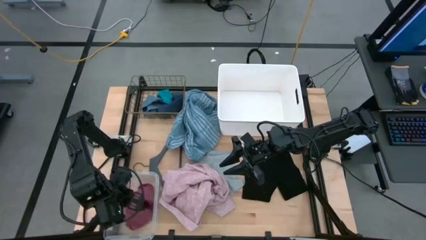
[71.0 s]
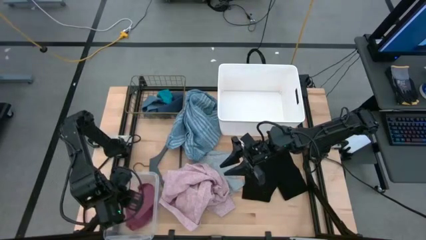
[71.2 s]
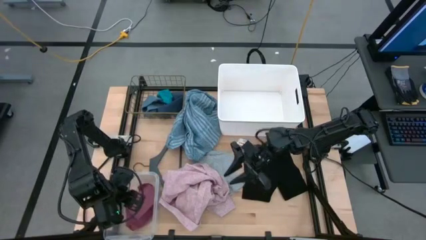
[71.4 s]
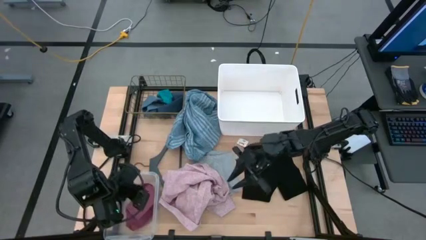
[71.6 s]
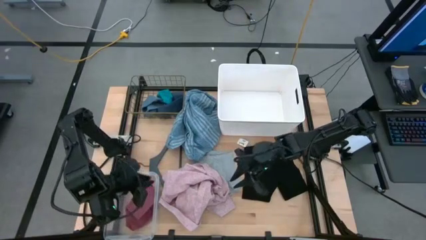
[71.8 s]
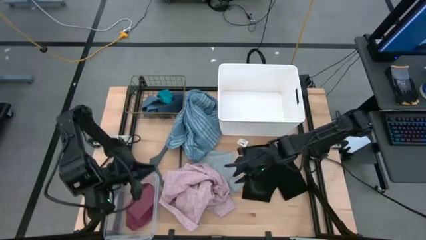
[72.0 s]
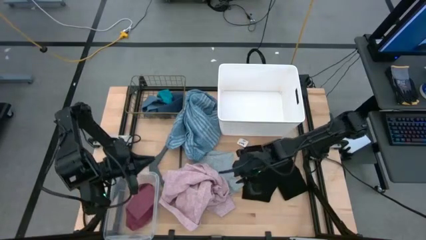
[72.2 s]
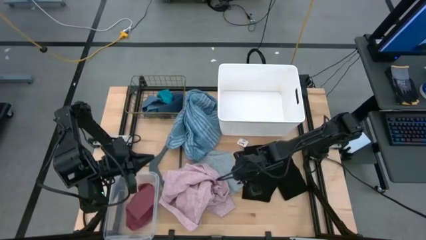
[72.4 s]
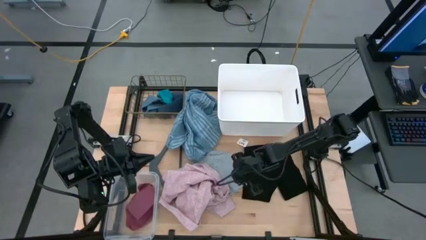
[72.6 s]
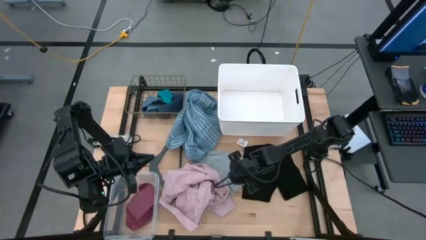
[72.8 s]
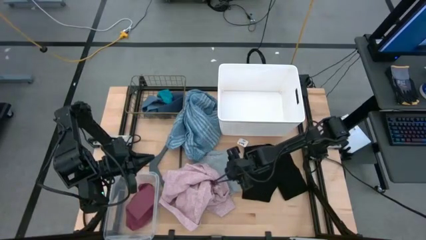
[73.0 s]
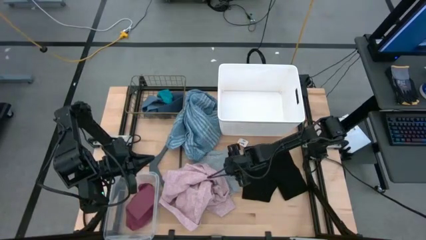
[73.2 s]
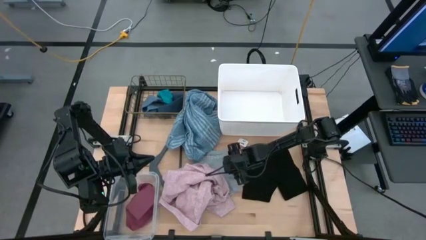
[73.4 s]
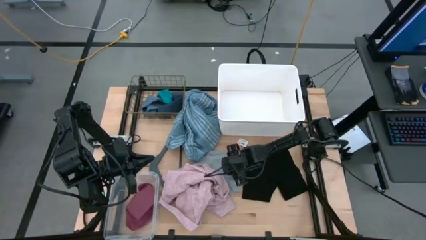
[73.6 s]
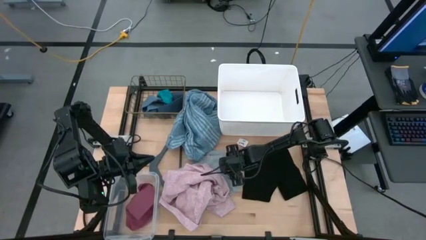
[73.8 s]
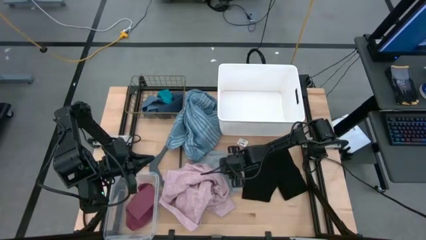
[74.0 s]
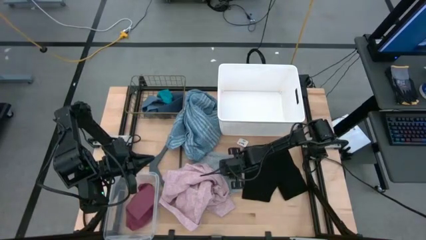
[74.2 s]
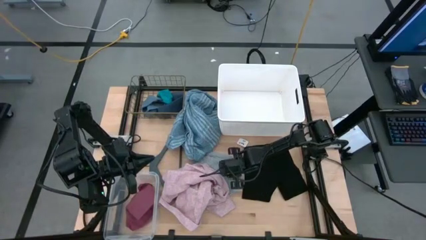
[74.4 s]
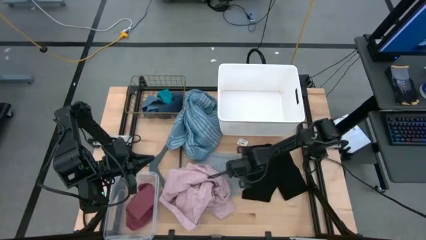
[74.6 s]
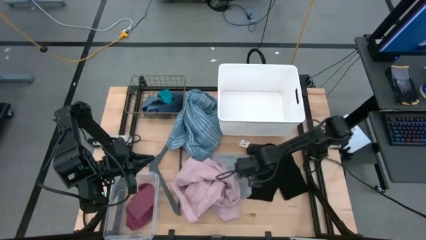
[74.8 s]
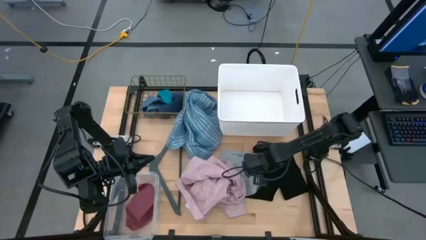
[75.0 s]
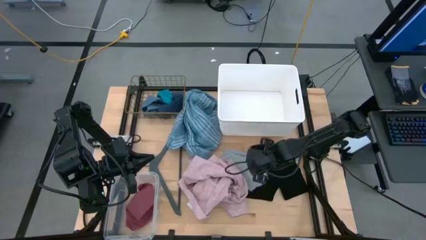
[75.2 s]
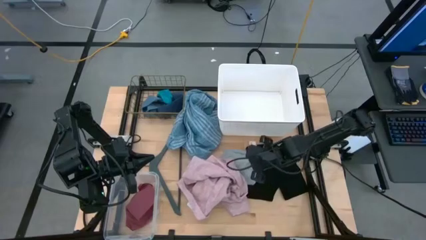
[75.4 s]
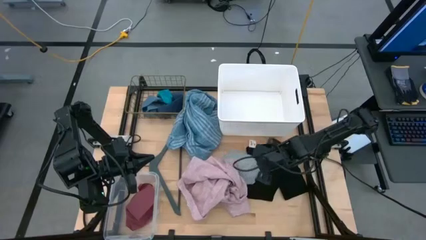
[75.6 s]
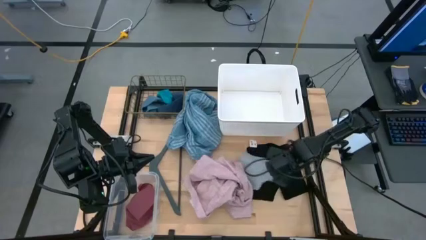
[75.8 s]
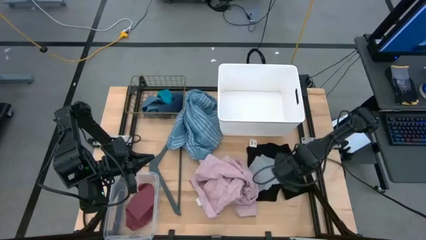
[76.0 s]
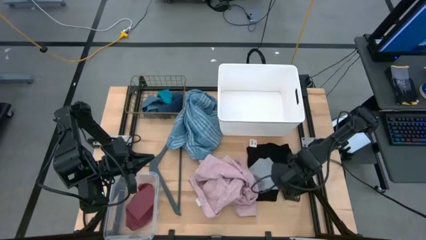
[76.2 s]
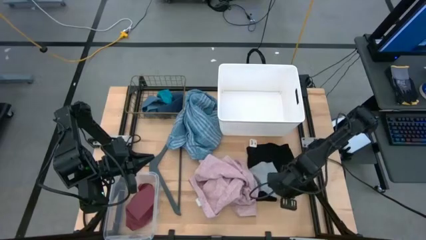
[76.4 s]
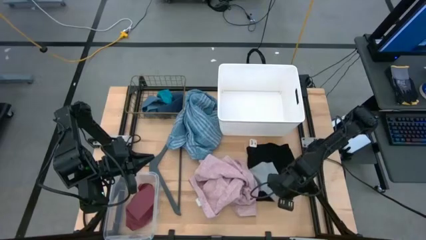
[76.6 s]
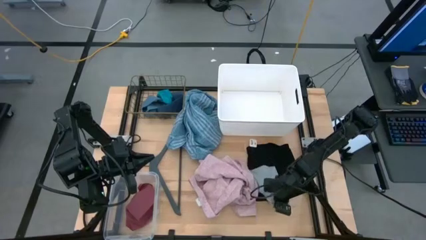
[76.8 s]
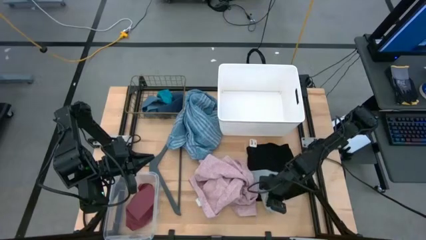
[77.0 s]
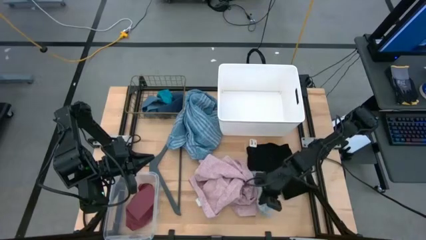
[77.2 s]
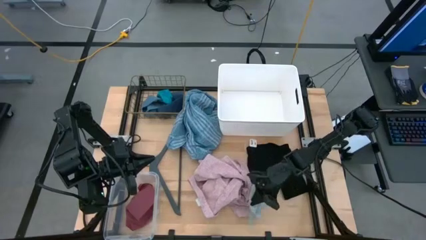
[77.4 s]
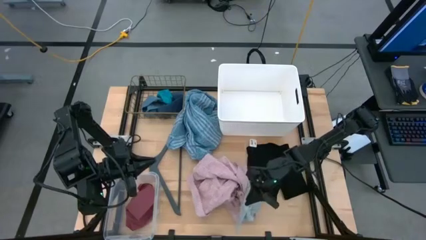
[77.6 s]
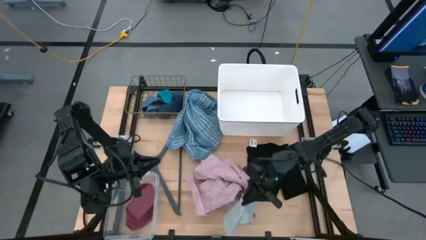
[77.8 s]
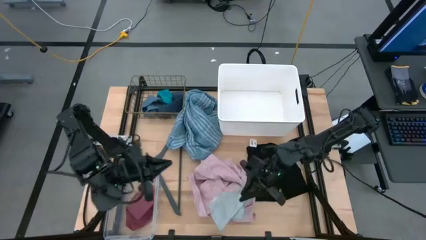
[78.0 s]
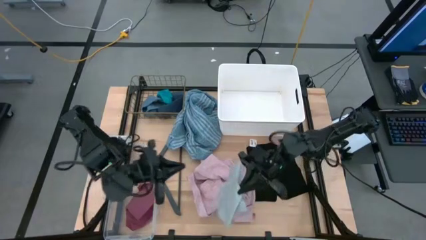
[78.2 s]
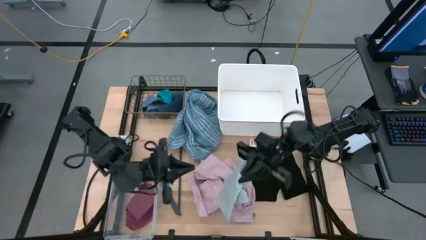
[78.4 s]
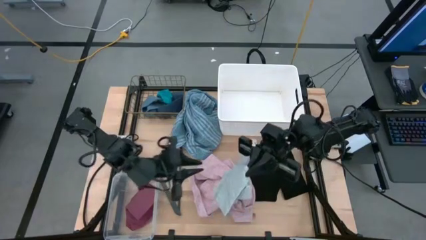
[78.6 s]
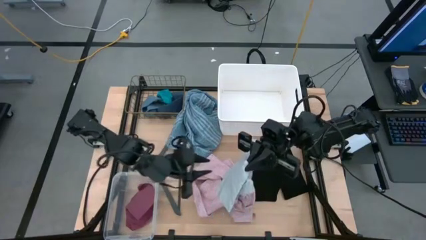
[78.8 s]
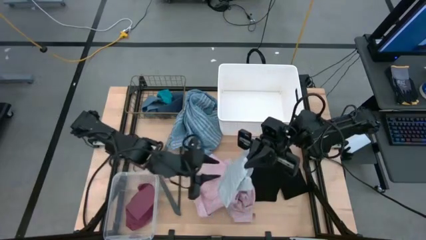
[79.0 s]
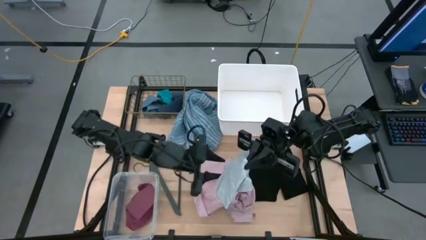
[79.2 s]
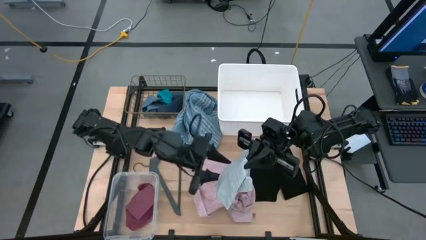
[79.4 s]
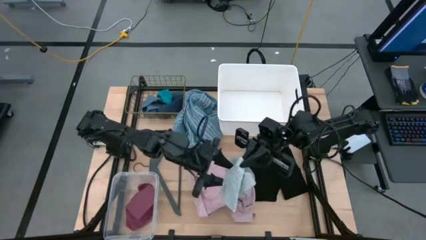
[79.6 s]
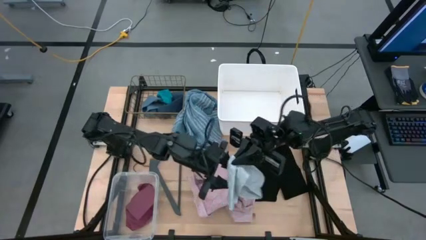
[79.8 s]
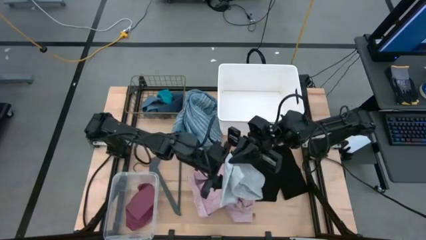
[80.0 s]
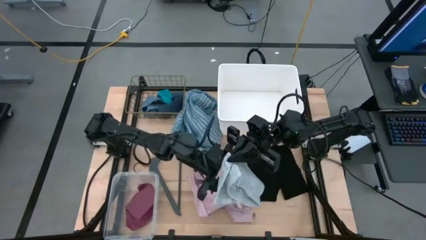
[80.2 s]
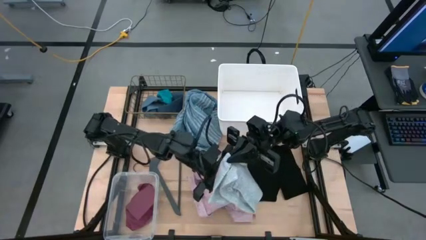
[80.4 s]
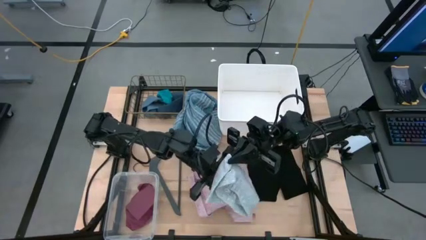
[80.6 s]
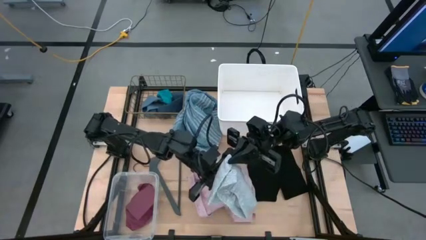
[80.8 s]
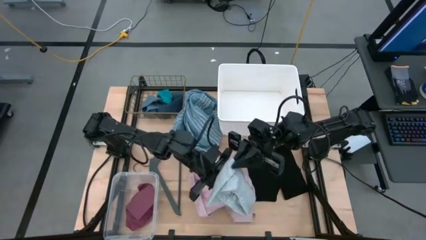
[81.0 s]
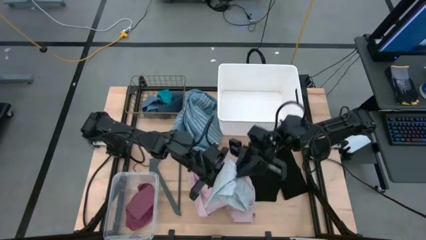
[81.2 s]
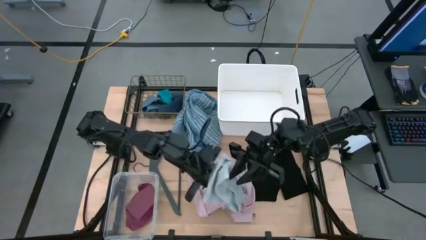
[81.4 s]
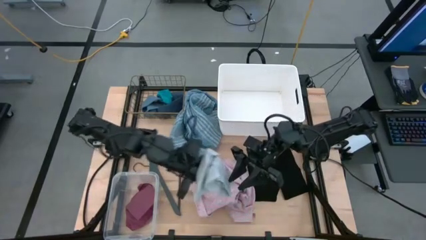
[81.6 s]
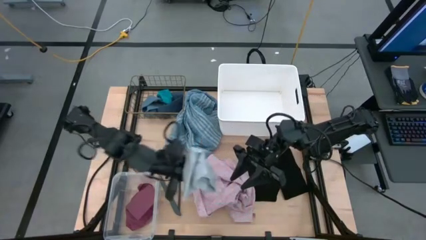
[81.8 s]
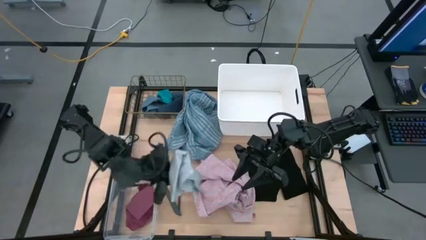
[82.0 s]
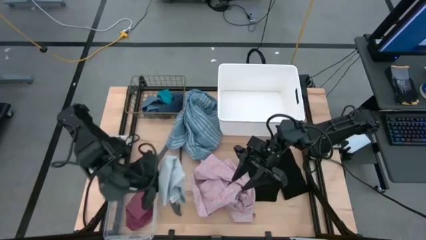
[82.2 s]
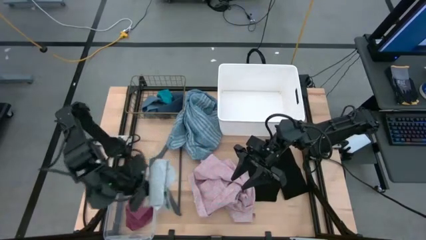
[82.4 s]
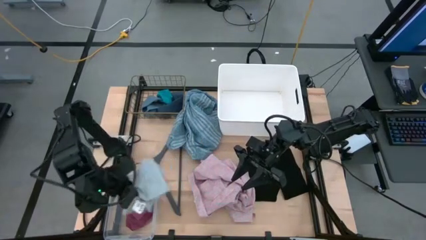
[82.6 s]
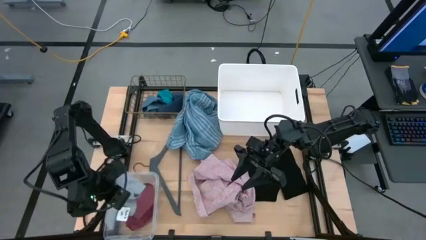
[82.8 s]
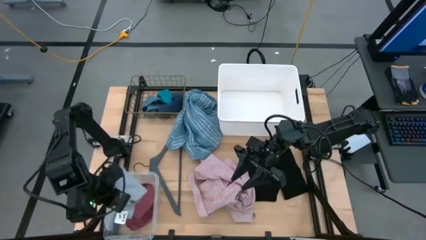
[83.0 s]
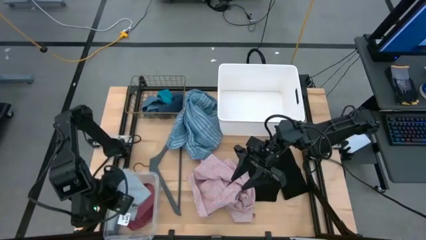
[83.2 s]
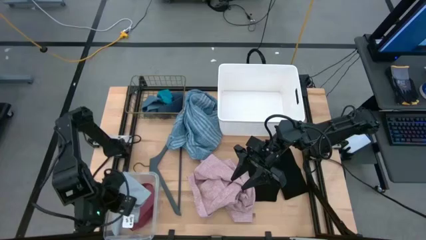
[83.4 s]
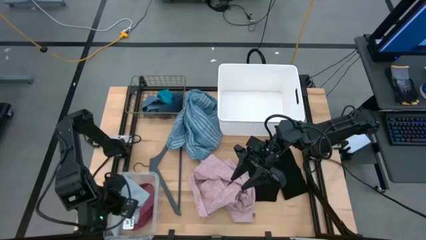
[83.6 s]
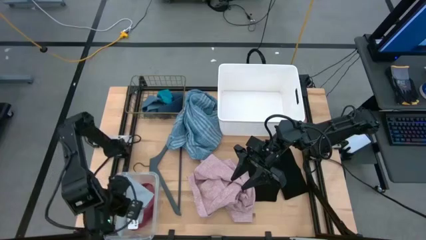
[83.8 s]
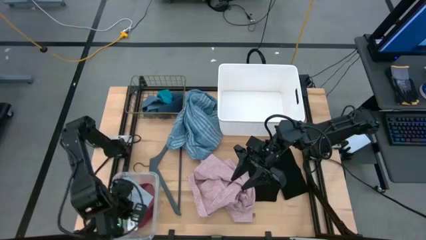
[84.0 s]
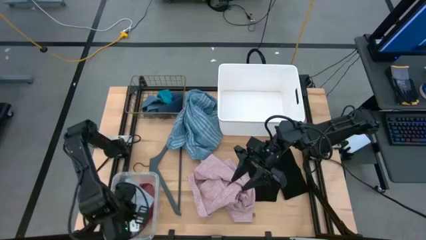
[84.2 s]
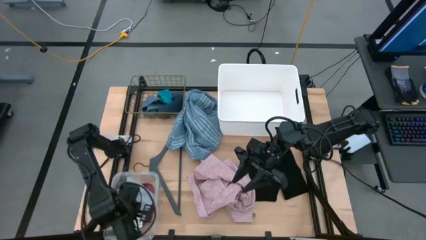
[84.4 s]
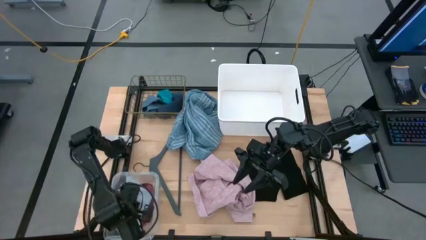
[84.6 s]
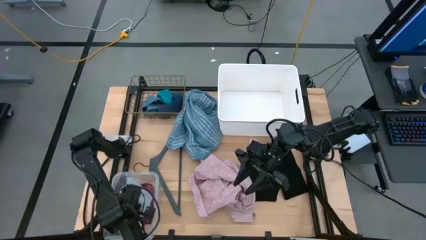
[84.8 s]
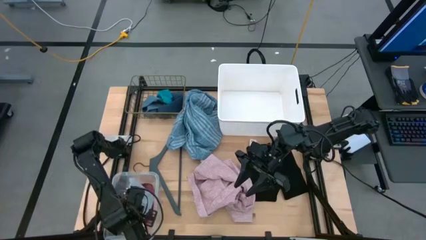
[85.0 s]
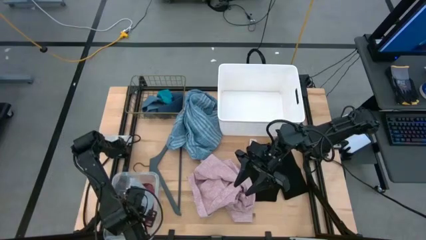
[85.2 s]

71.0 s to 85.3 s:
Task: Pick & Place Cloths
Put the gray boxers into the transparent bin

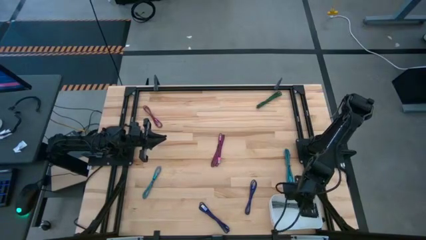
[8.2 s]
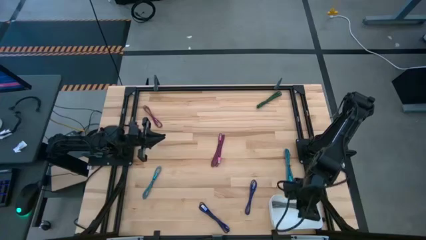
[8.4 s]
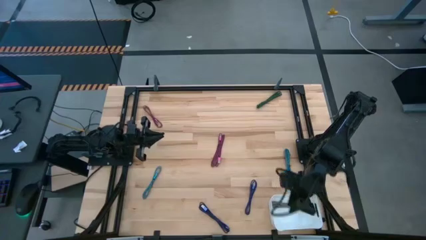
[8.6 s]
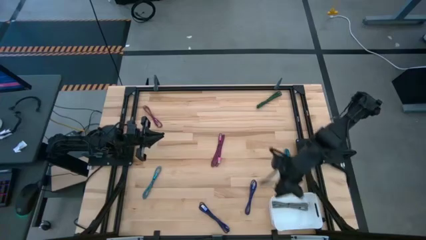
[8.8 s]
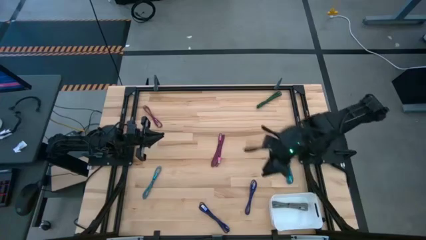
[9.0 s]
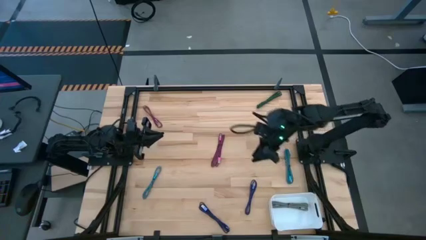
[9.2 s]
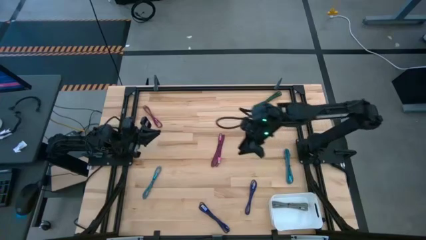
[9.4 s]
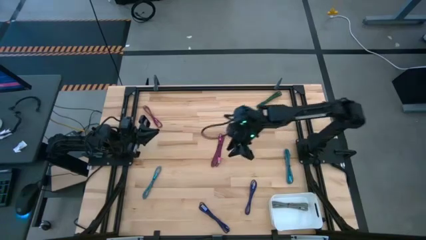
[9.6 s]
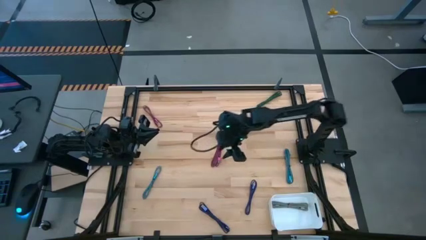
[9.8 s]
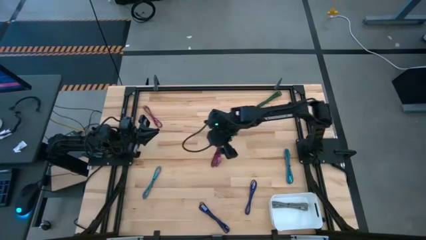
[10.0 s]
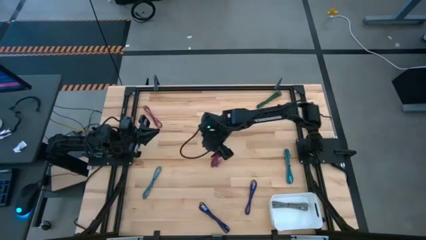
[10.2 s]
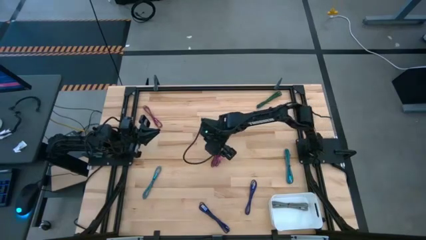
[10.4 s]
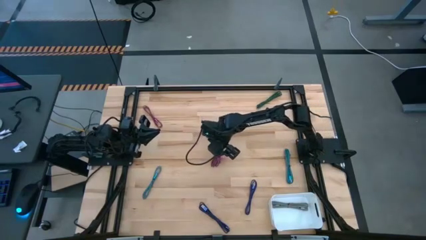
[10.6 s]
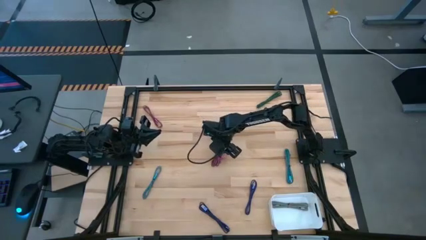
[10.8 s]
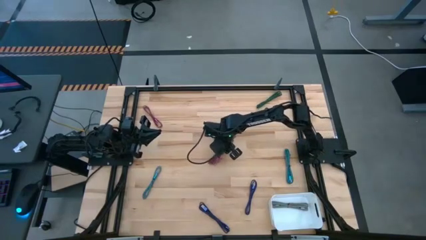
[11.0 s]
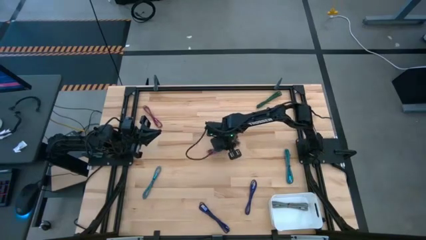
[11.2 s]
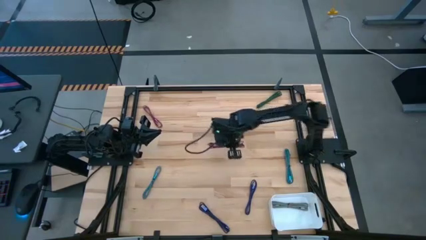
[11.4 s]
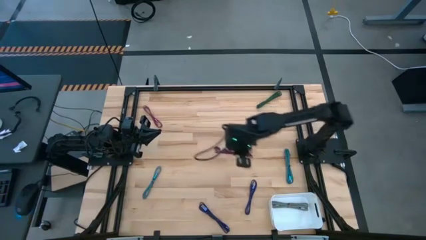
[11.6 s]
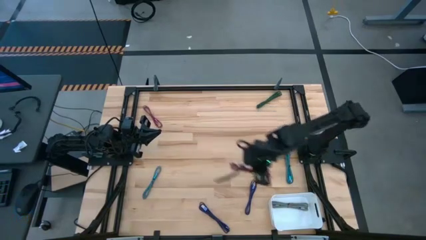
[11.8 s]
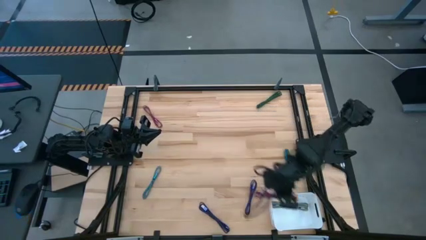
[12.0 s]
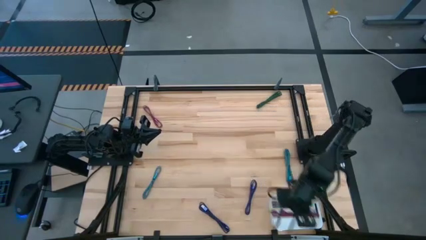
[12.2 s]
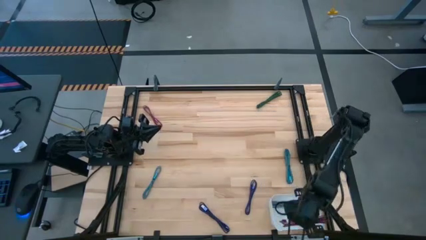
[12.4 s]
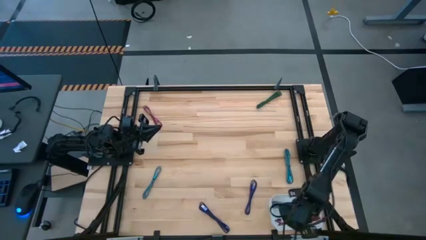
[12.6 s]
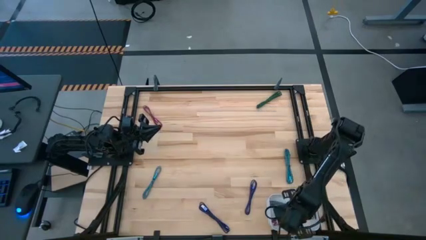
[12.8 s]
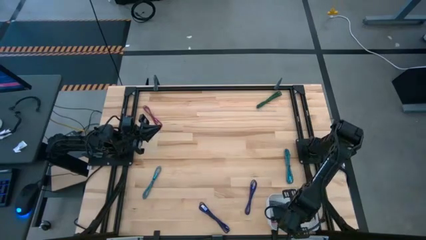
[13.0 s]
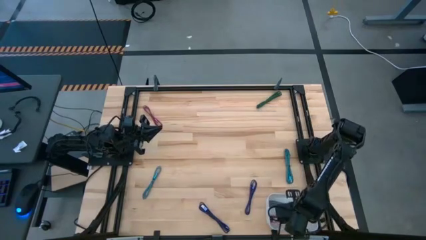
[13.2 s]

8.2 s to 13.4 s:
Task: Pick and place USB-C Cables
Put the right pink USB cable into the white bin
